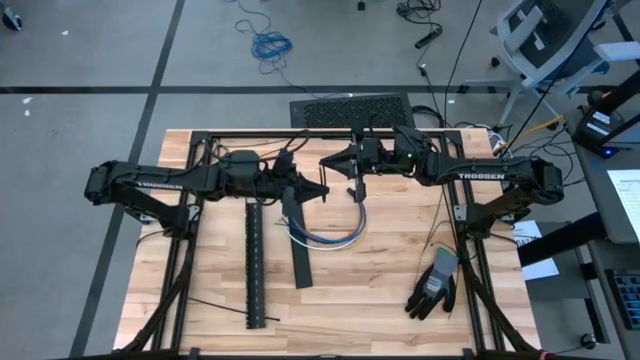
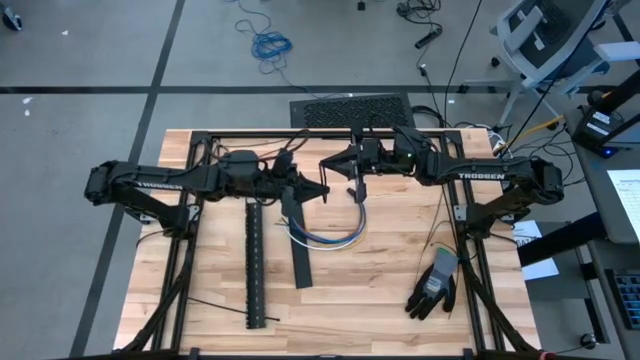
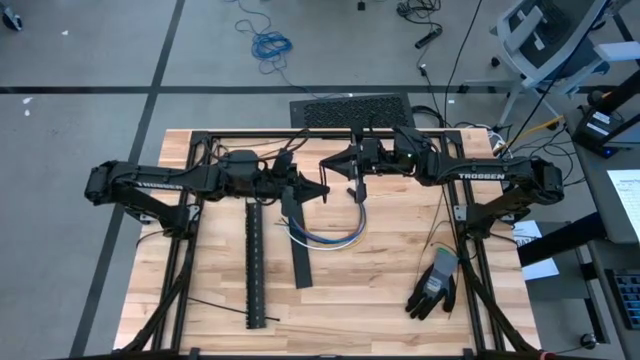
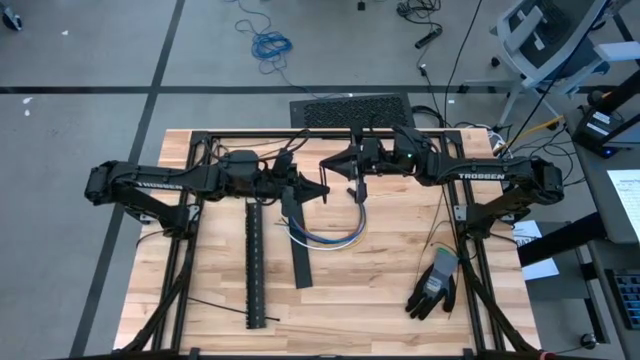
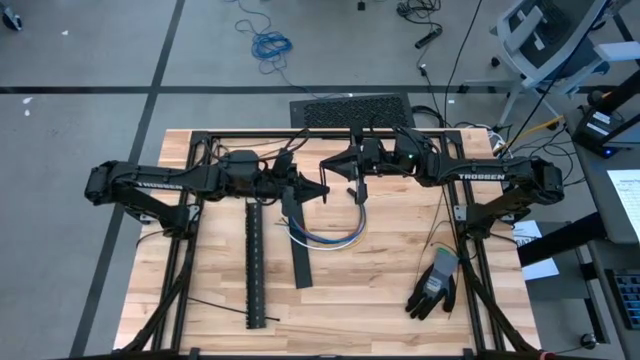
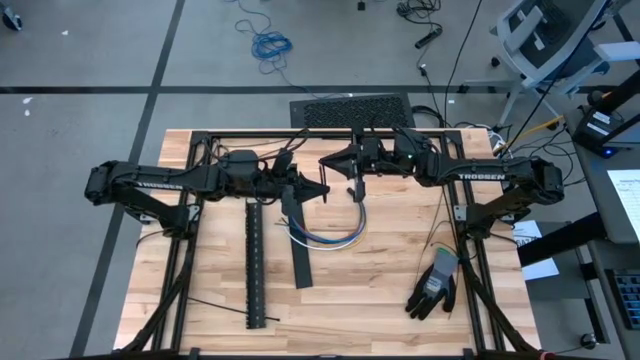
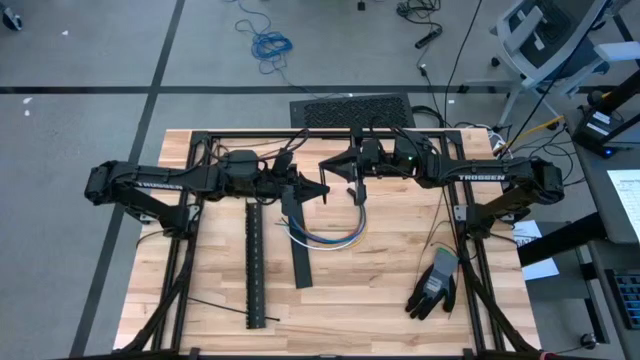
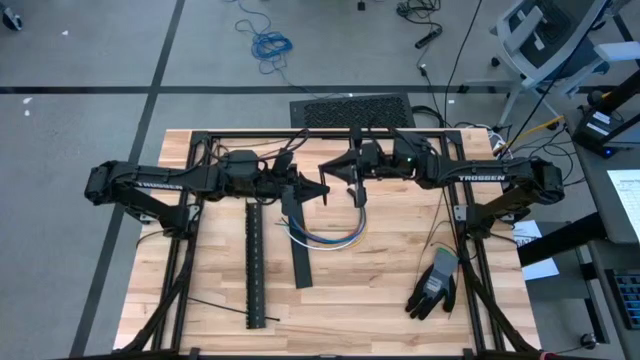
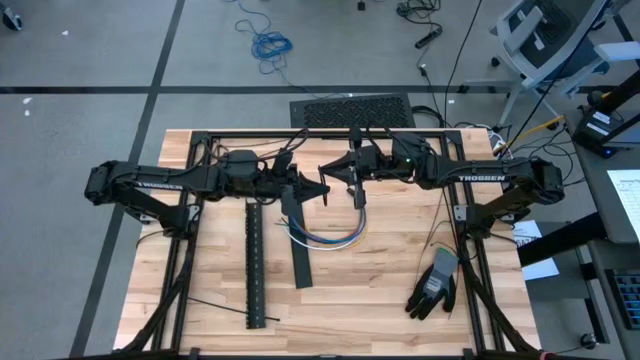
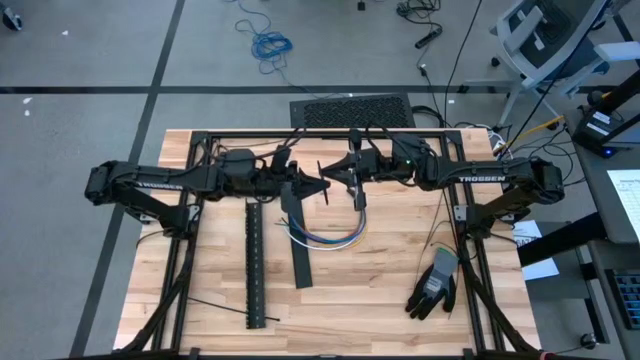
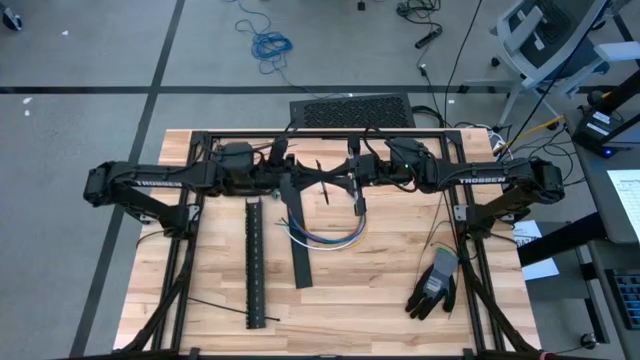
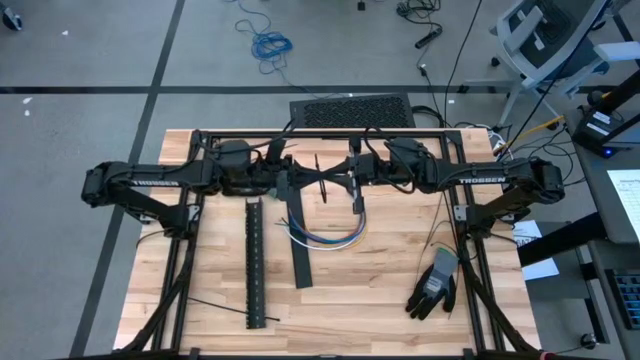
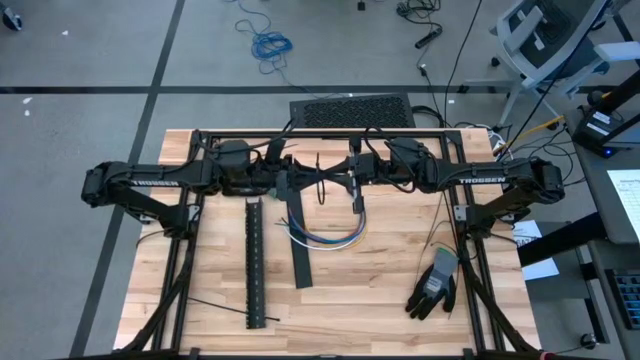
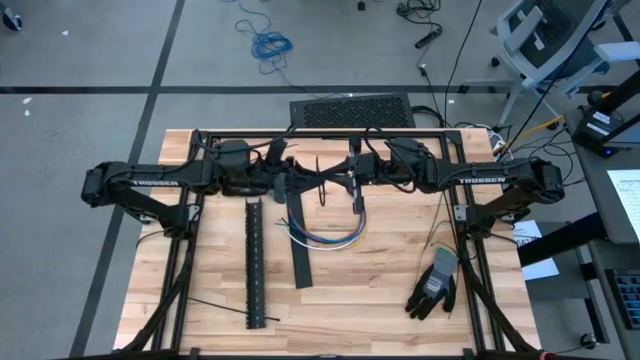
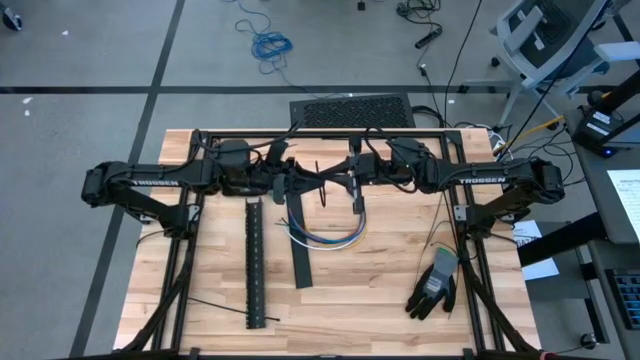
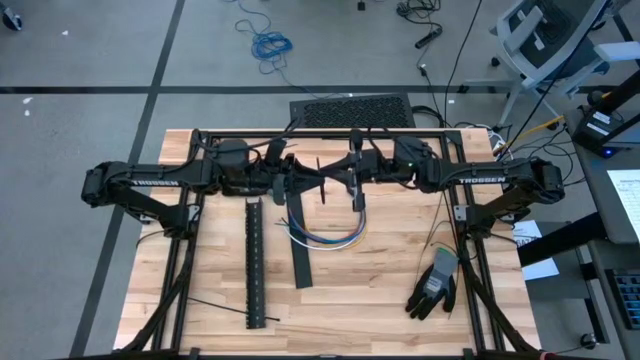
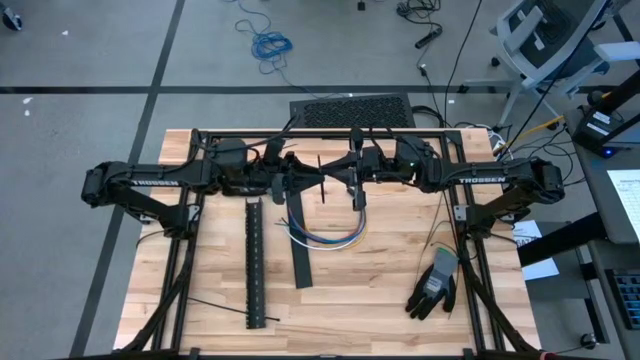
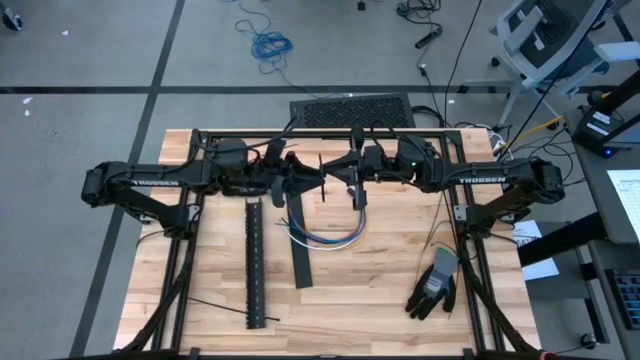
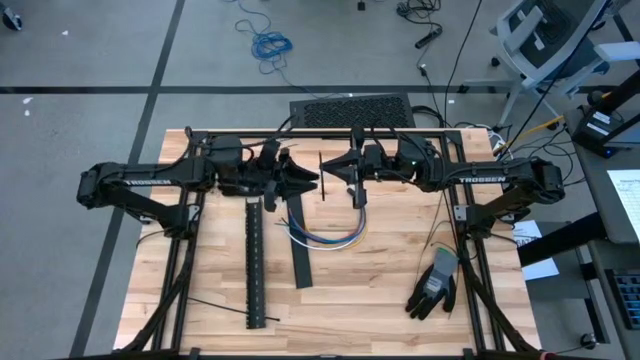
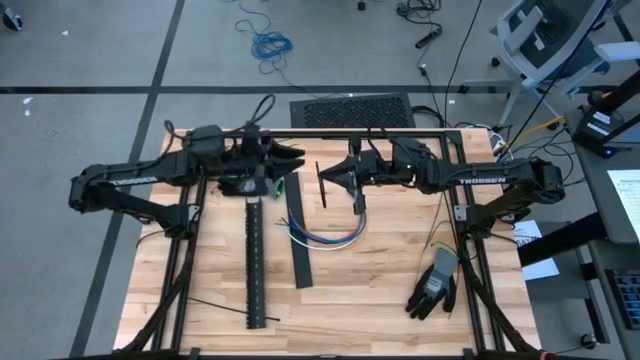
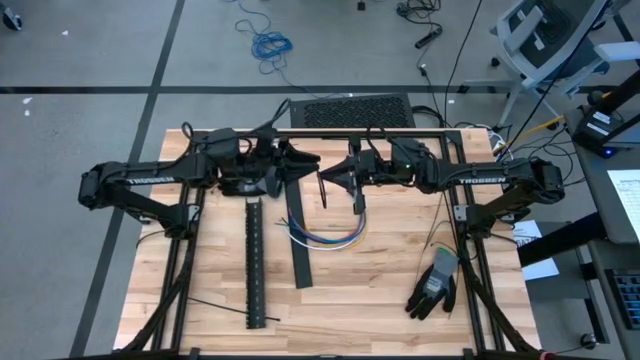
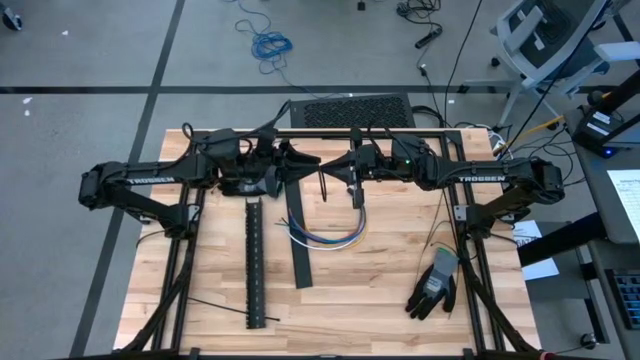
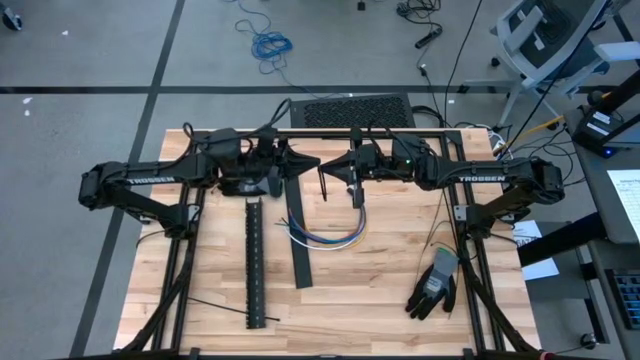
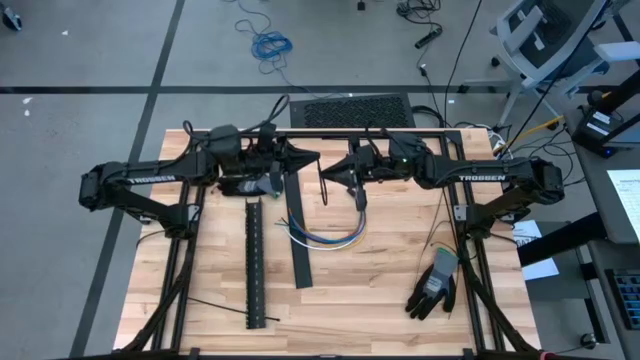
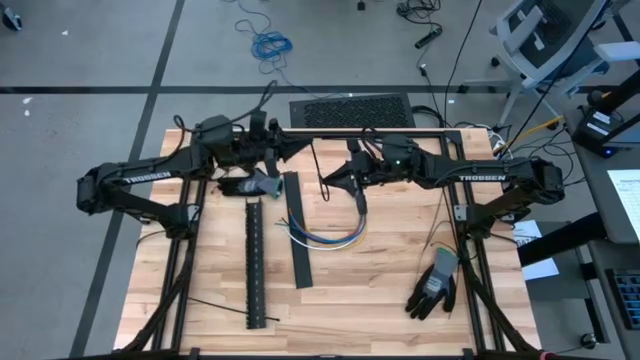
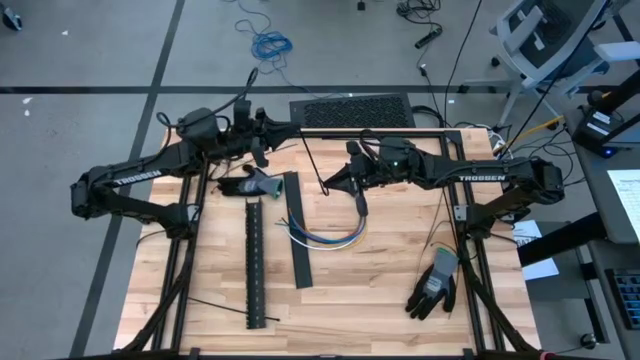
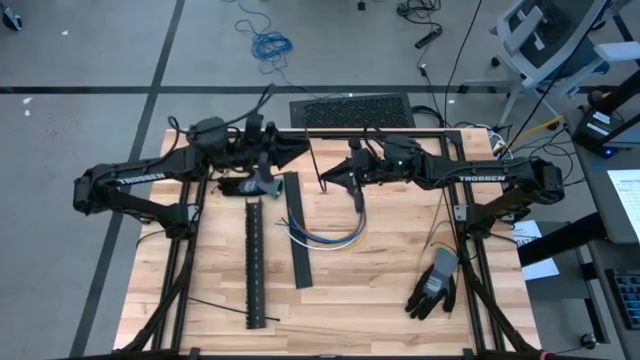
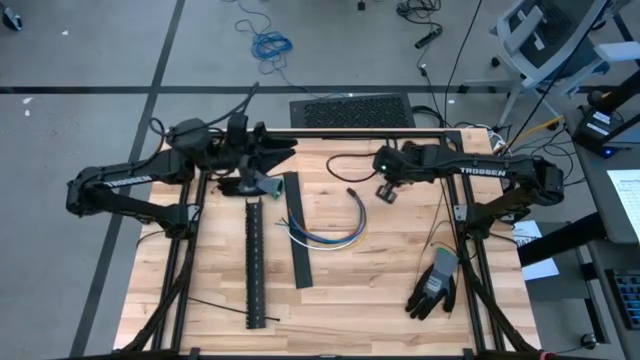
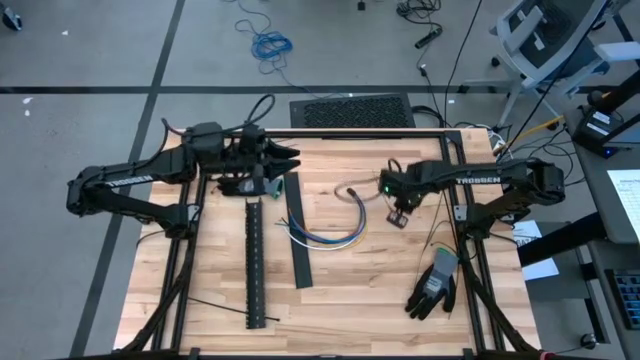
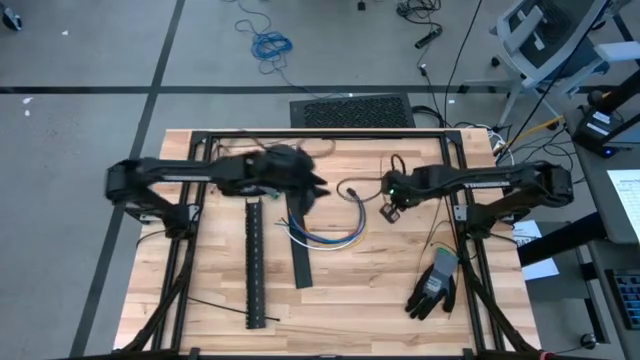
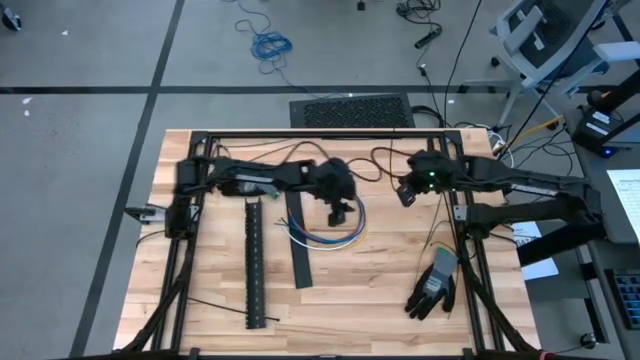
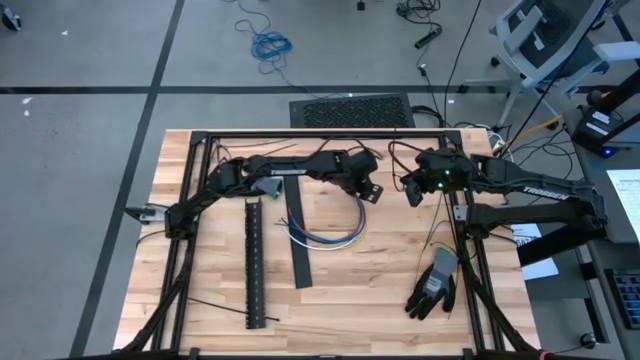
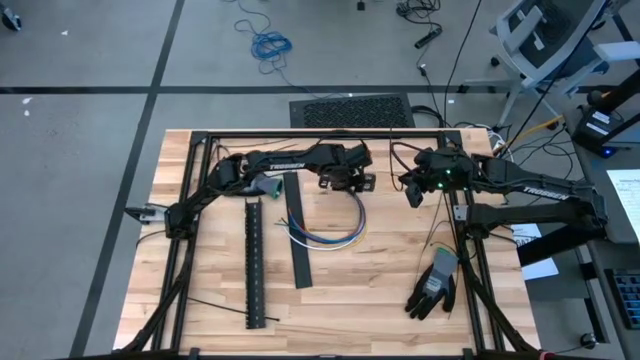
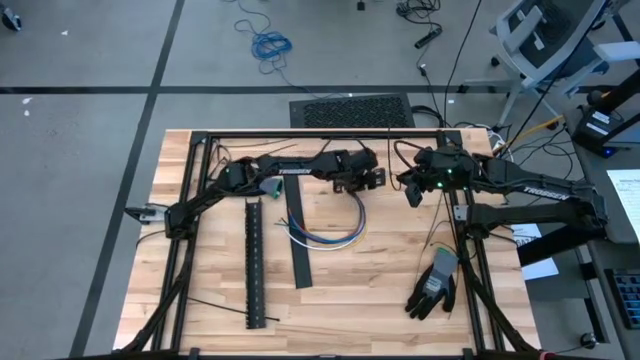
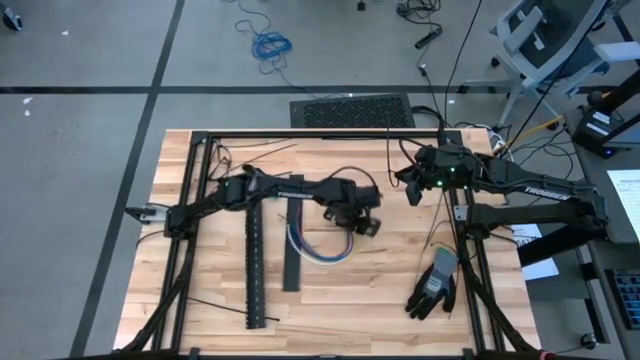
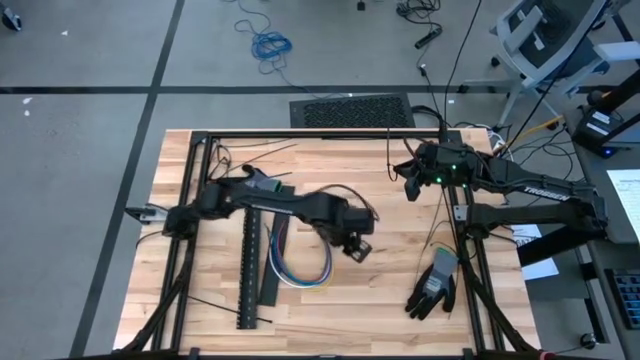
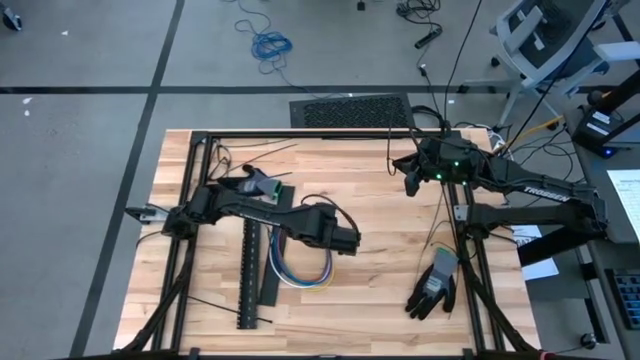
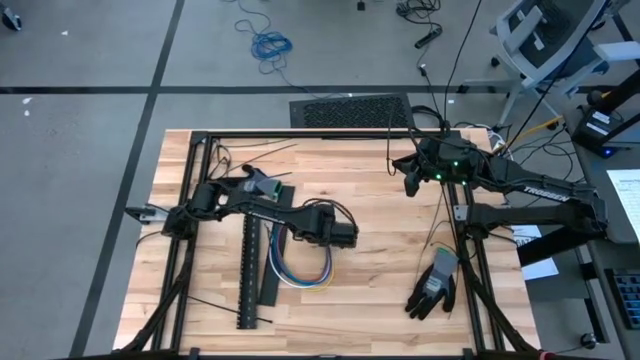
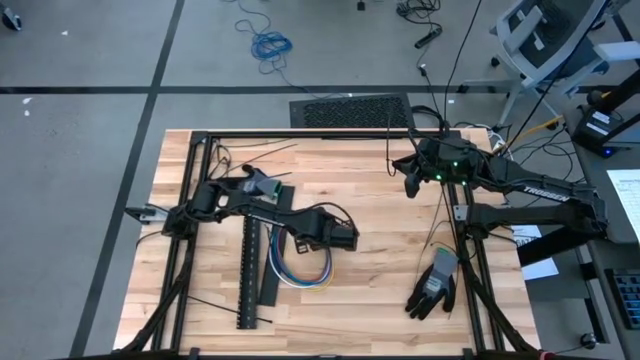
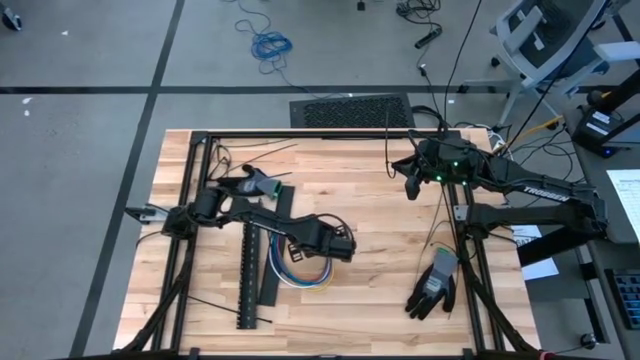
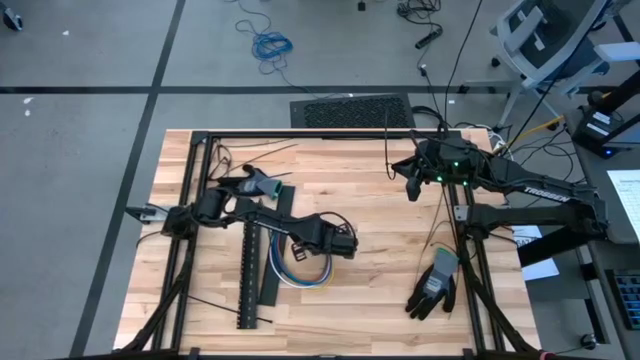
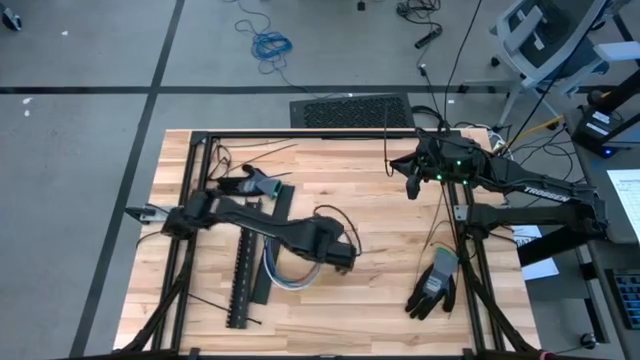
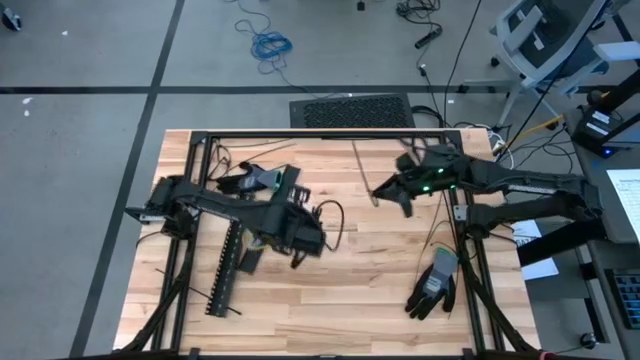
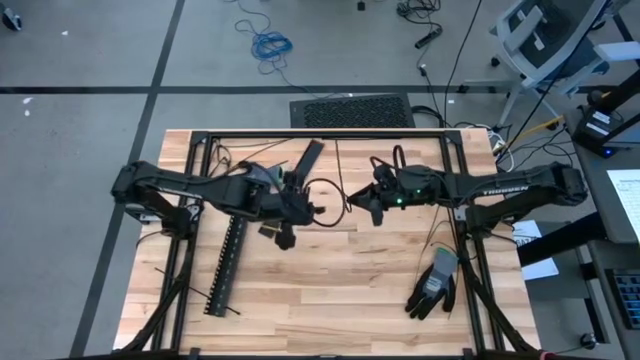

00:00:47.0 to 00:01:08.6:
Task: Ziptie cables
Wrap the cable wires with a black zip tie

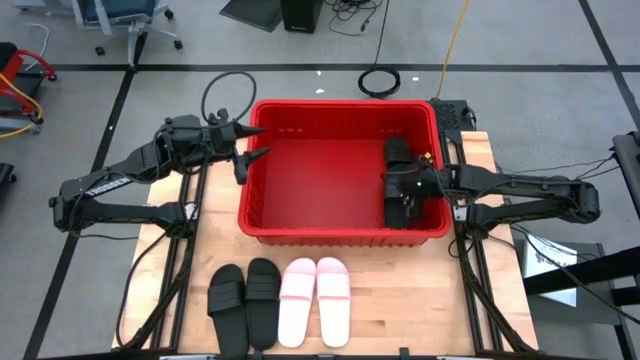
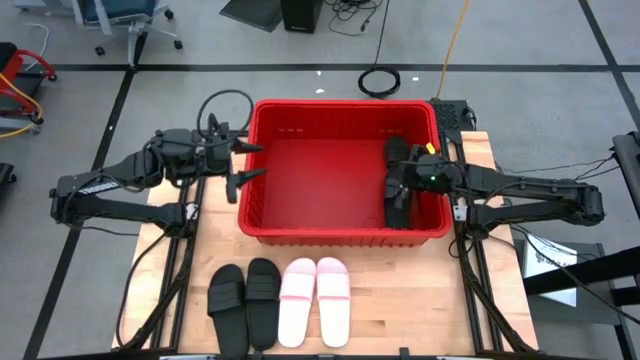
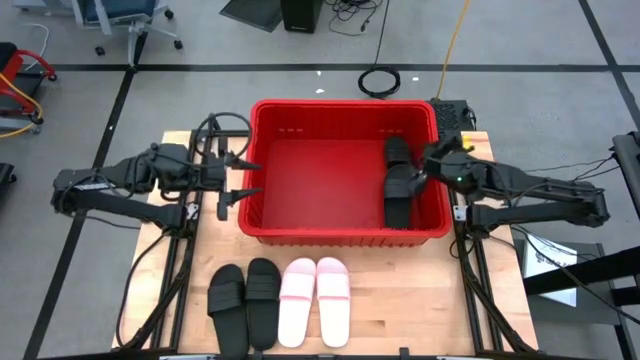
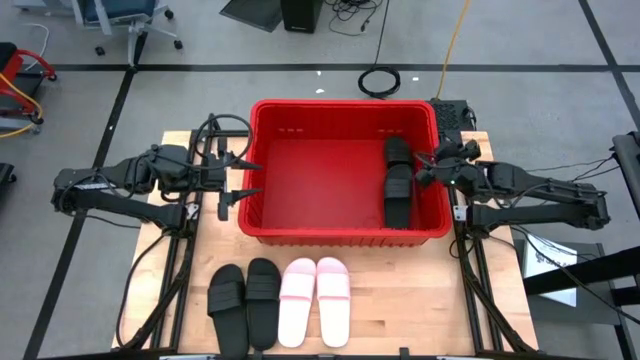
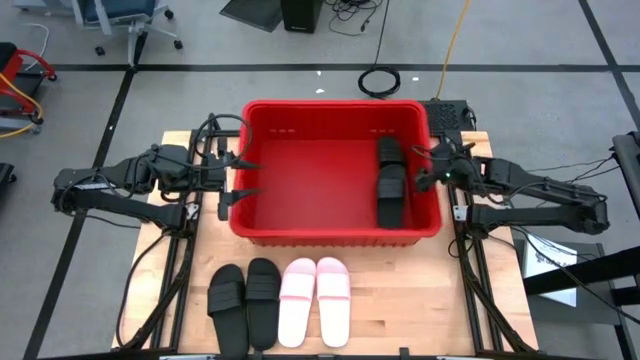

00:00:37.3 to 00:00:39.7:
Task: Pick and place slides into bin
Adjust the red bin
